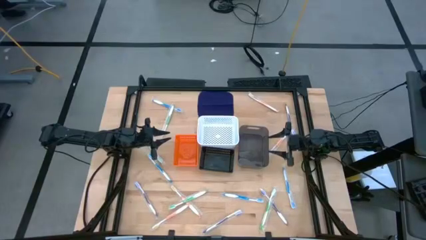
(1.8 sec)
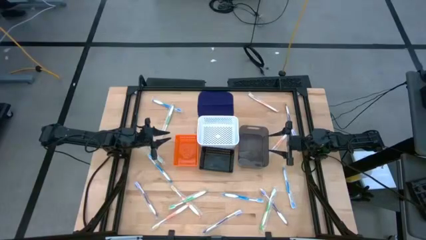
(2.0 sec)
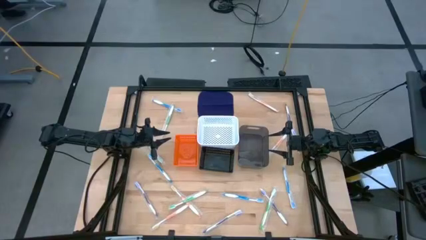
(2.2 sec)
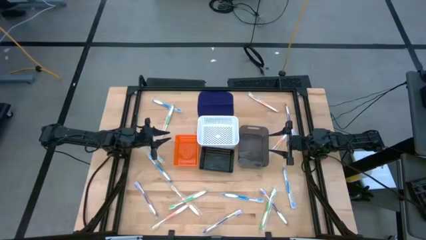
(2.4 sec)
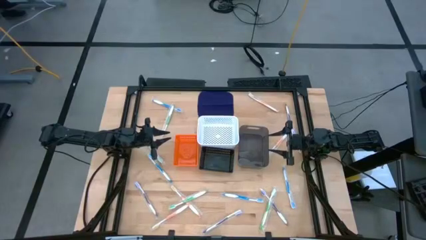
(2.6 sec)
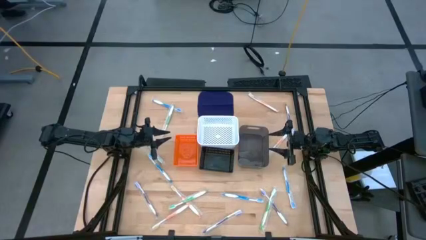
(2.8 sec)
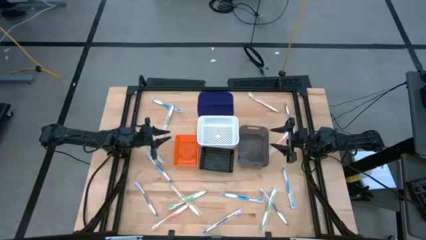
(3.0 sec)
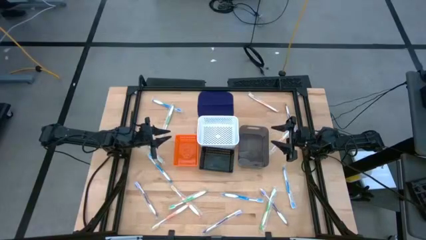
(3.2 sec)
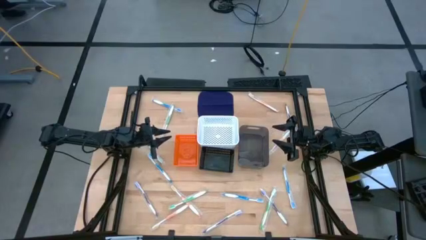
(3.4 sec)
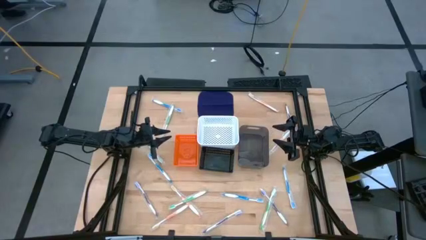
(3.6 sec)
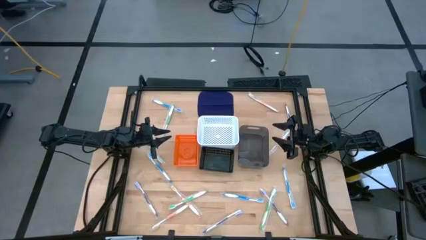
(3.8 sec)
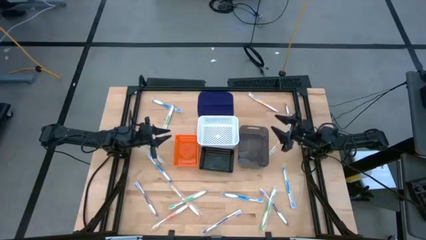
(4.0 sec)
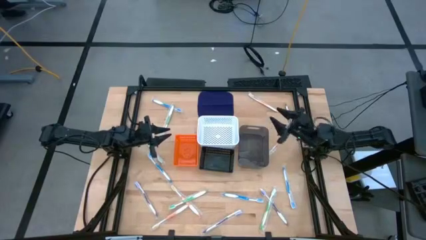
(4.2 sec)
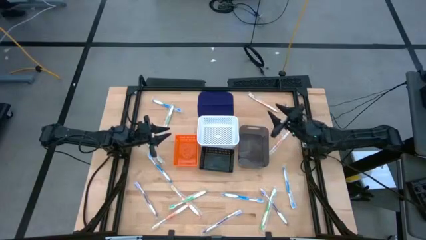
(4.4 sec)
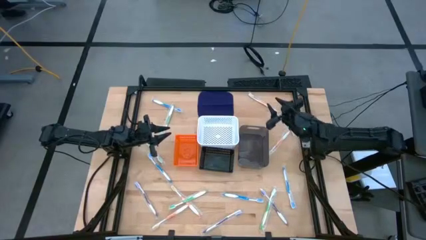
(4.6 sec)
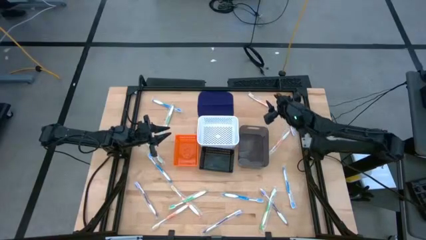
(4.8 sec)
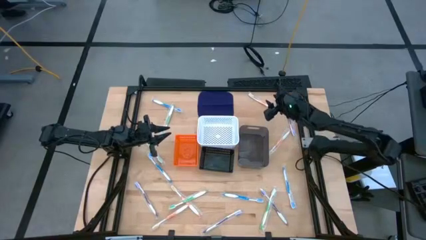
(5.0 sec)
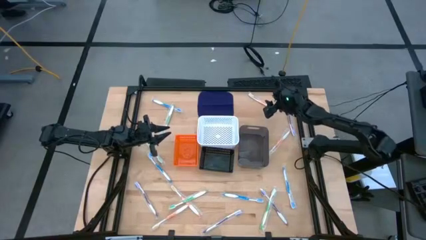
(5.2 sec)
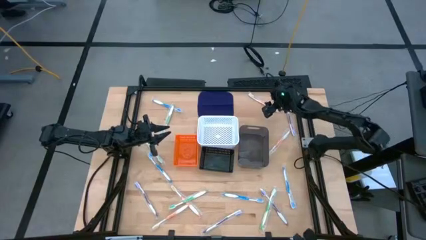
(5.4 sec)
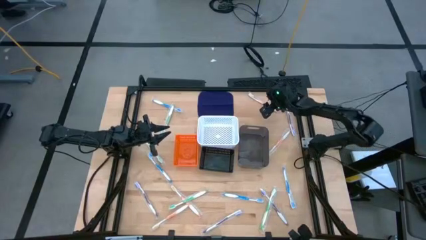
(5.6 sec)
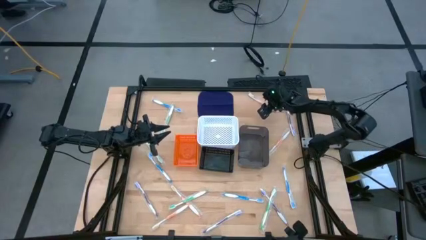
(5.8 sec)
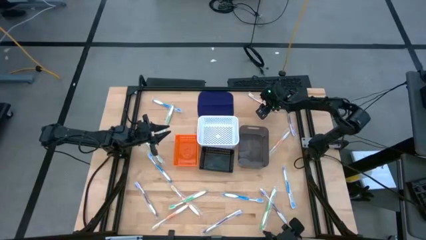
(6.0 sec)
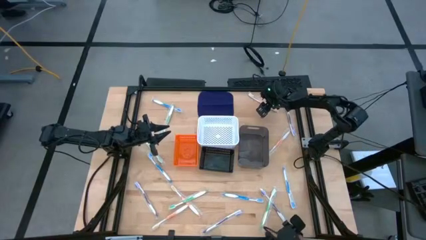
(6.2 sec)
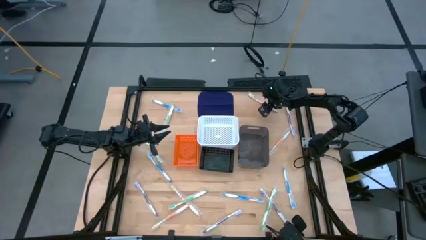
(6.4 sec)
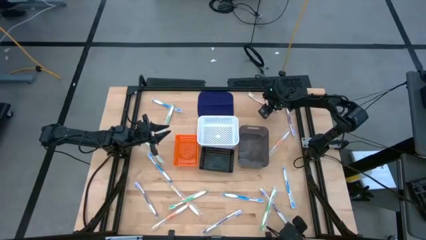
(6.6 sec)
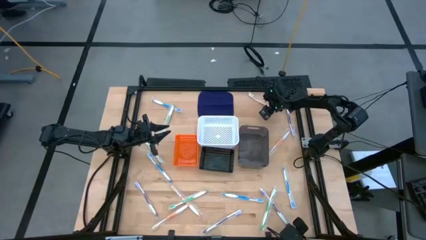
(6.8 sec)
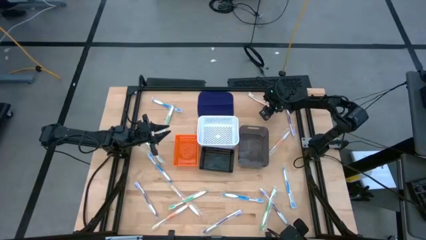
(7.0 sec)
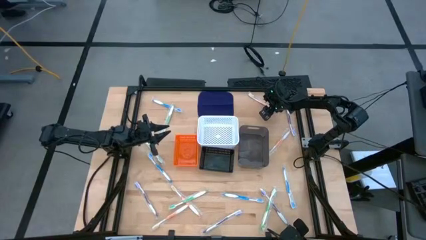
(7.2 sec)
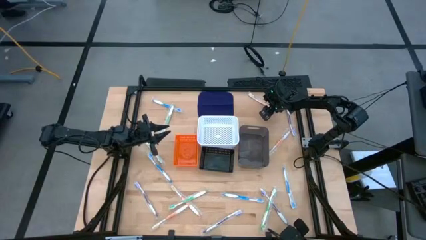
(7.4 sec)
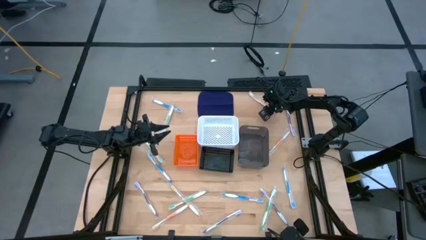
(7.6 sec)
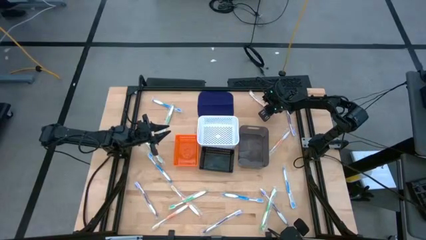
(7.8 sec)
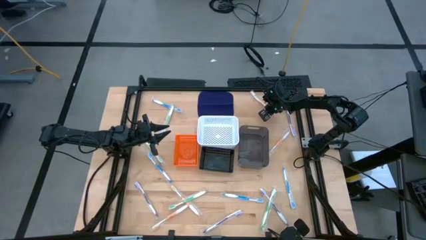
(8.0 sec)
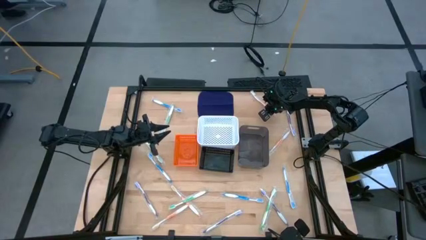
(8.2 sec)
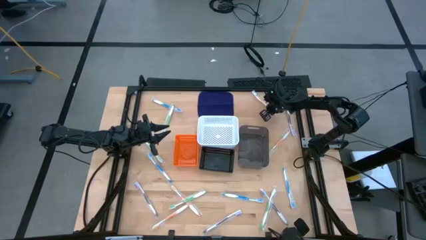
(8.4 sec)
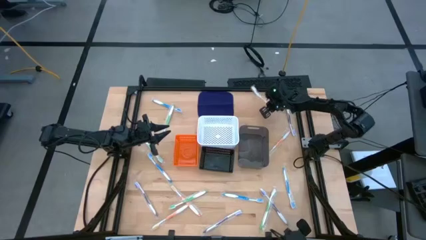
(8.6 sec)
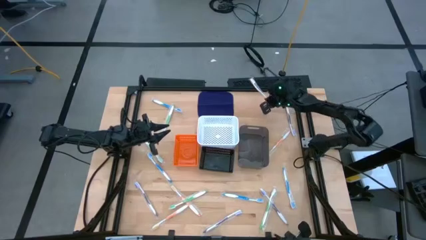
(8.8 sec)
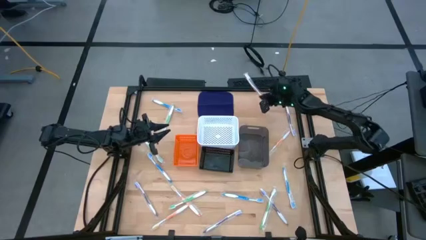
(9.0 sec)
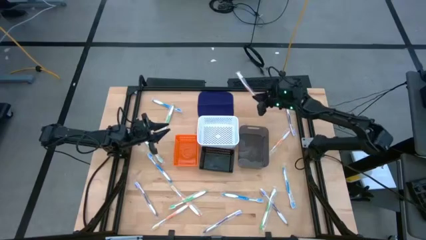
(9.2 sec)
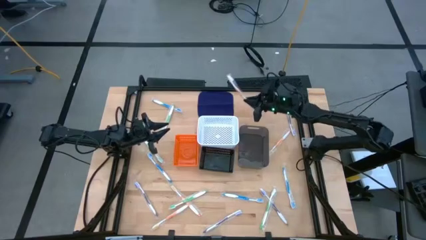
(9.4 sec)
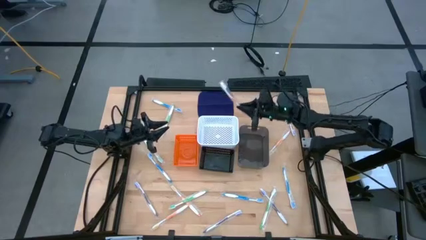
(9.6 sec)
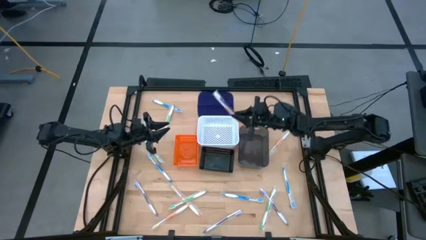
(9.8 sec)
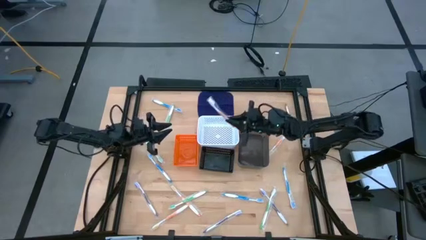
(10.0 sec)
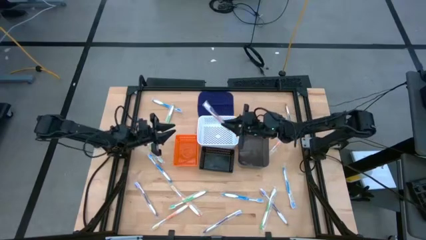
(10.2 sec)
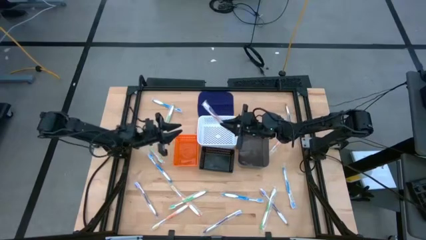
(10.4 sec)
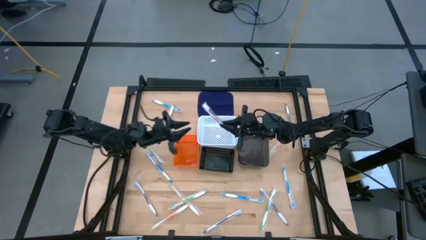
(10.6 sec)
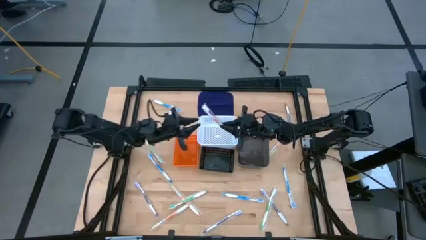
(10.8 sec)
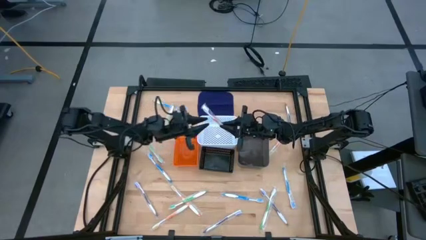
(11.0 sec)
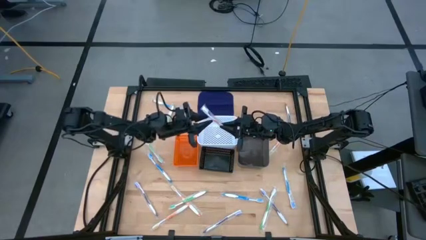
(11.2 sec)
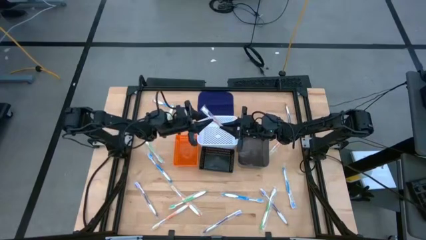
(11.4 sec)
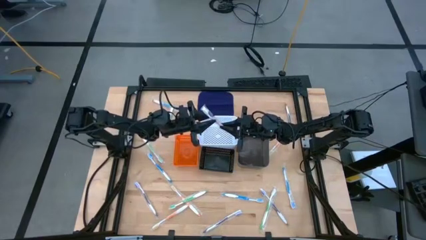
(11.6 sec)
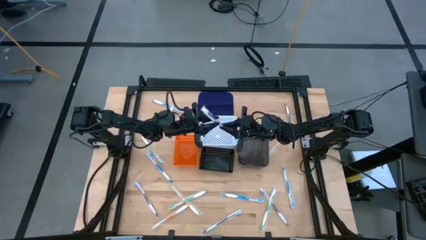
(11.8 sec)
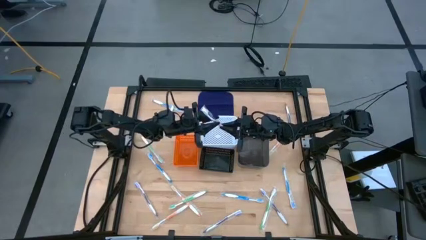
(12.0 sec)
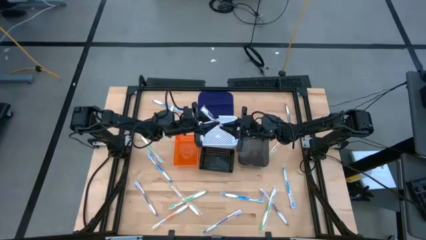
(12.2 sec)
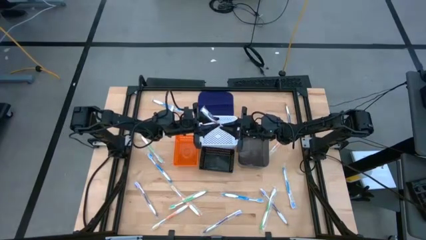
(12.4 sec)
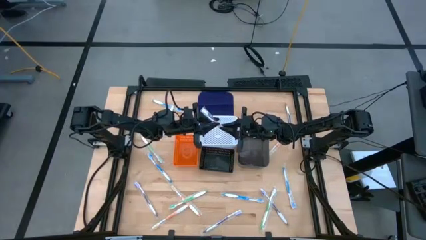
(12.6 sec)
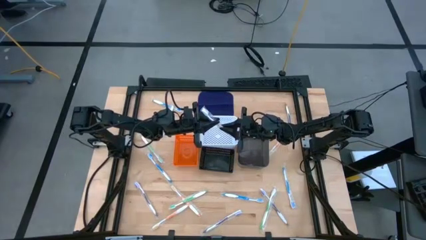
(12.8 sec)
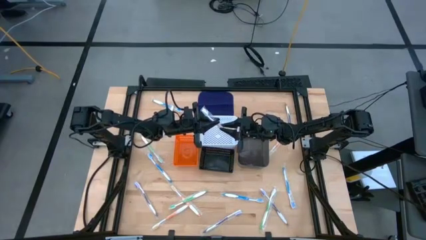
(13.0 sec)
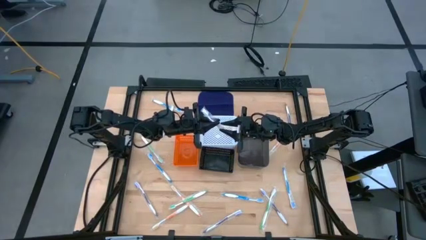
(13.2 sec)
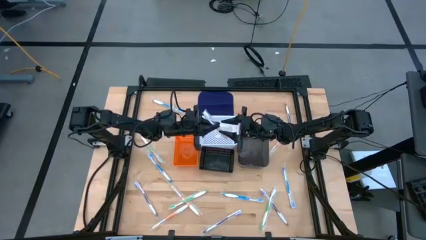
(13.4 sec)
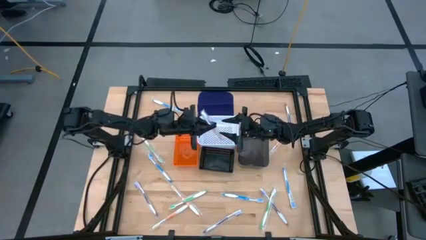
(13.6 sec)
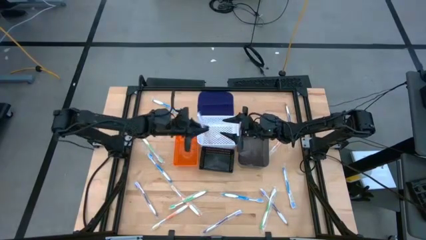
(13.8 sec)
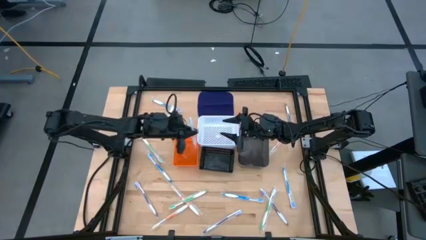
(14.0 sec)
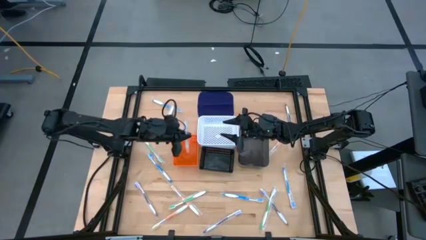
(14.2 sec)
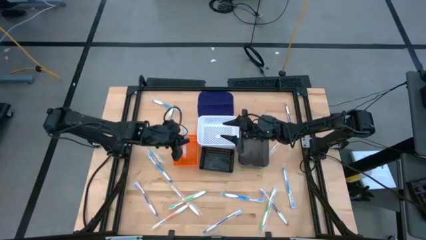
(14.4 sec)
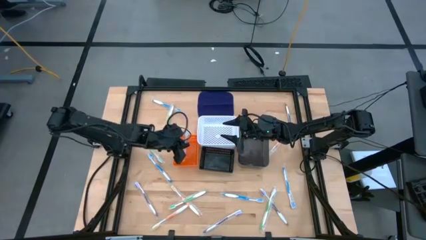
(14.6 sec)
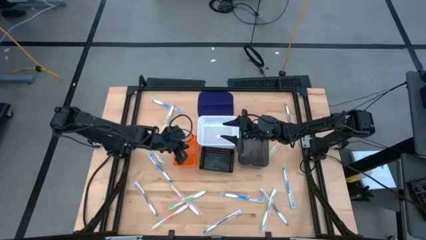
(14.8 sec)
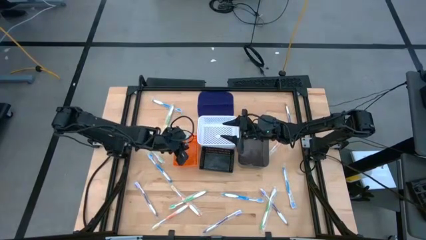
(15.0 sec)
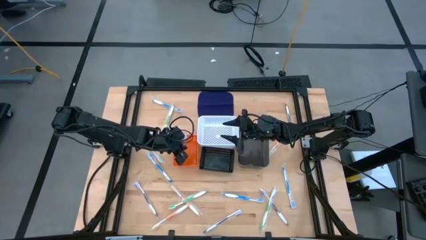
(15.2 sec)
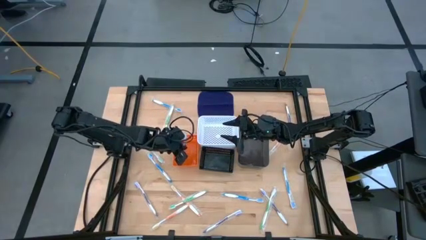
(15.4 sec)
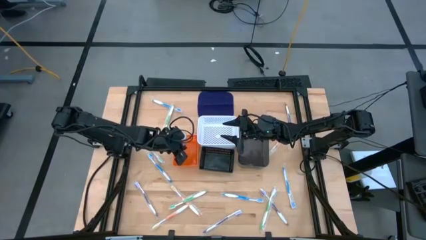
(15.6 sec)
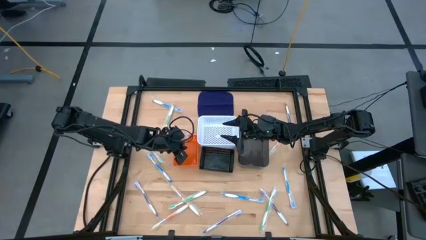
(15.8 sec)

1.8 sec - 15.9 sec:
Task: Pick & Place Toothbrushes
Put the orange toothbrush into the orange basket
